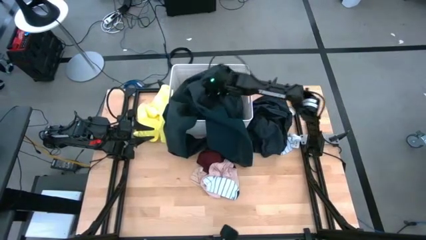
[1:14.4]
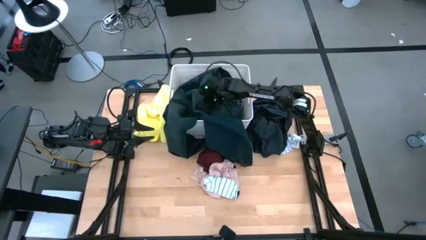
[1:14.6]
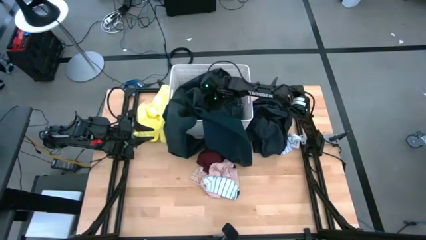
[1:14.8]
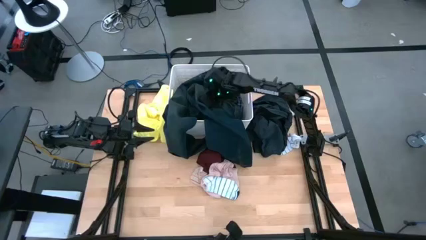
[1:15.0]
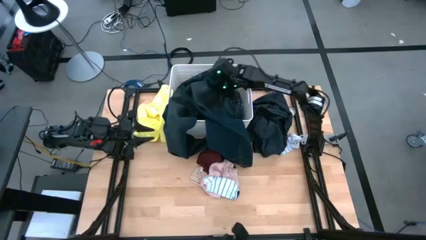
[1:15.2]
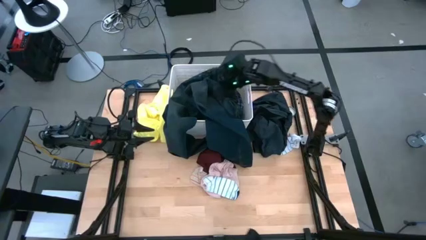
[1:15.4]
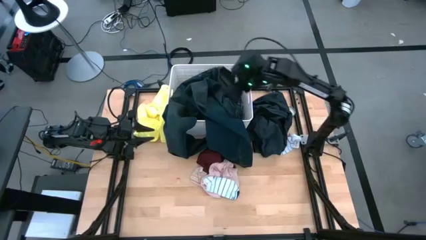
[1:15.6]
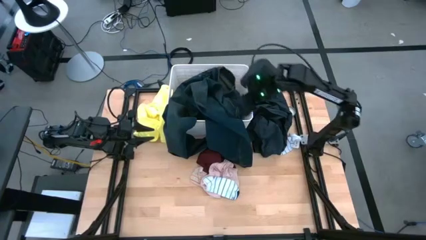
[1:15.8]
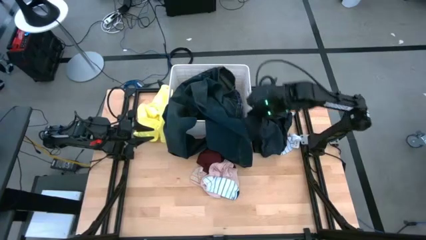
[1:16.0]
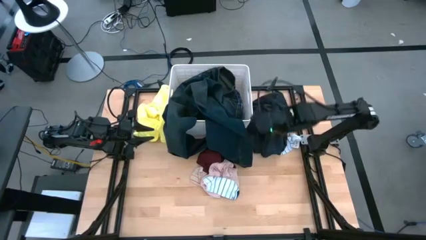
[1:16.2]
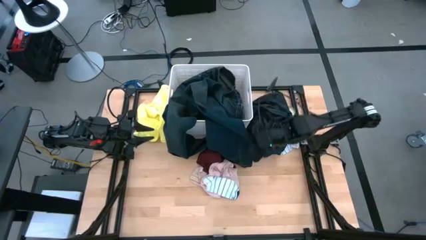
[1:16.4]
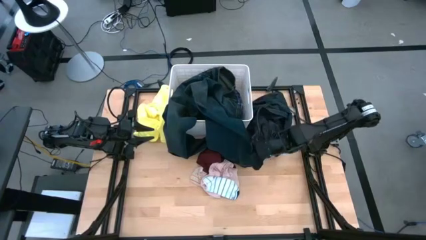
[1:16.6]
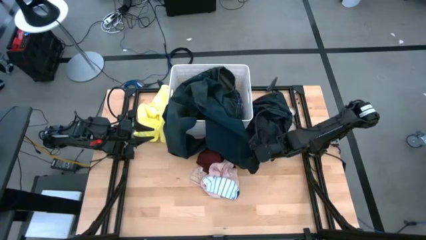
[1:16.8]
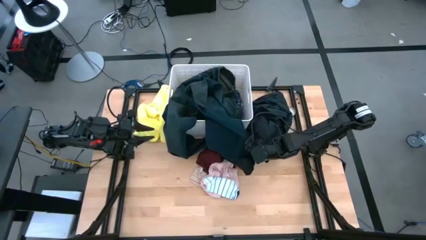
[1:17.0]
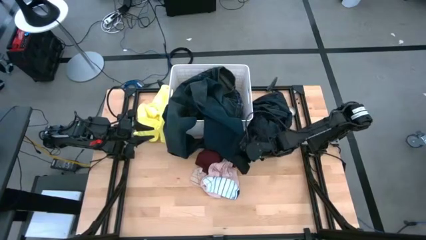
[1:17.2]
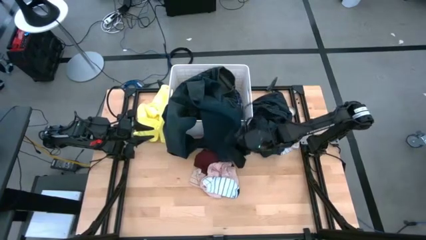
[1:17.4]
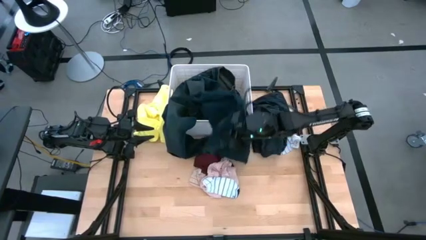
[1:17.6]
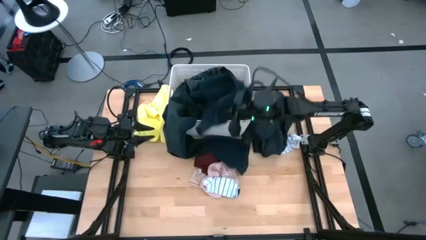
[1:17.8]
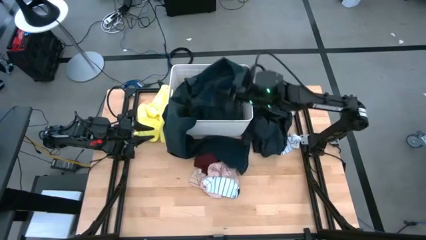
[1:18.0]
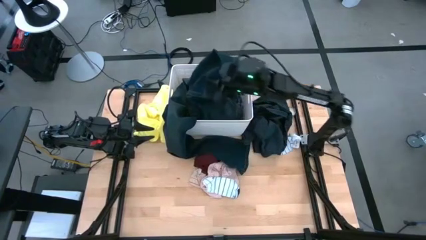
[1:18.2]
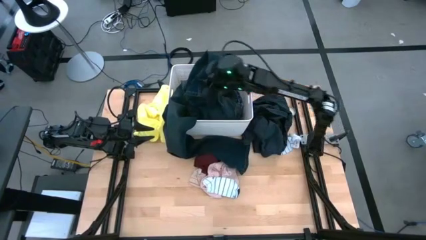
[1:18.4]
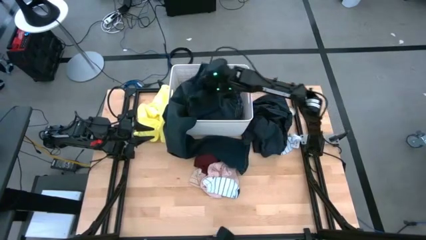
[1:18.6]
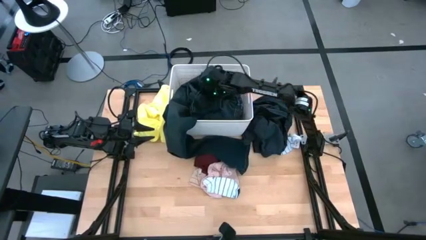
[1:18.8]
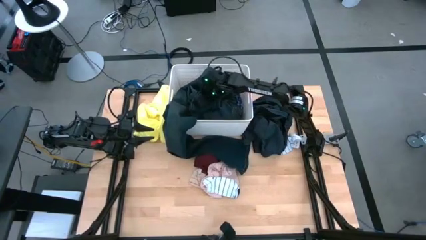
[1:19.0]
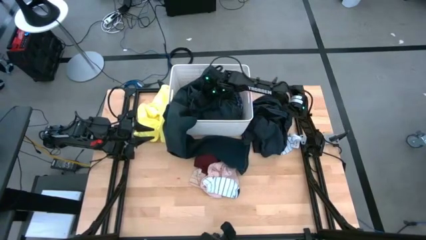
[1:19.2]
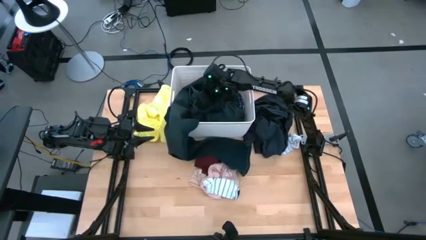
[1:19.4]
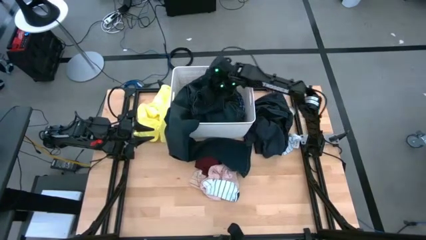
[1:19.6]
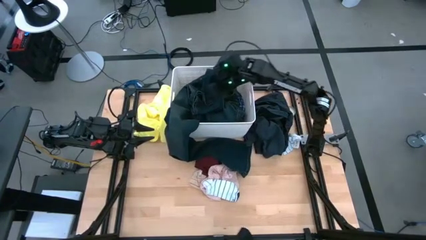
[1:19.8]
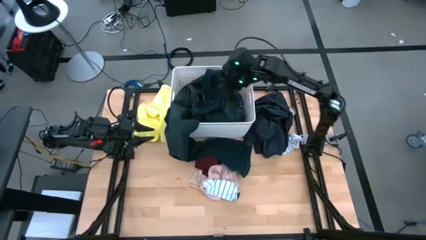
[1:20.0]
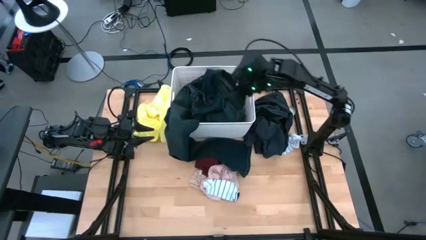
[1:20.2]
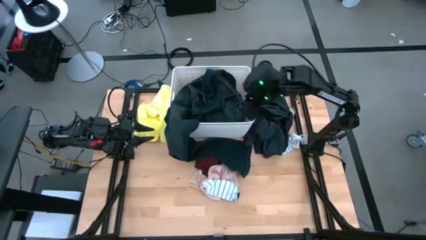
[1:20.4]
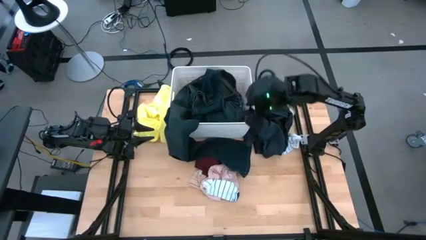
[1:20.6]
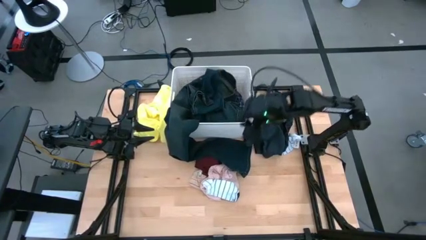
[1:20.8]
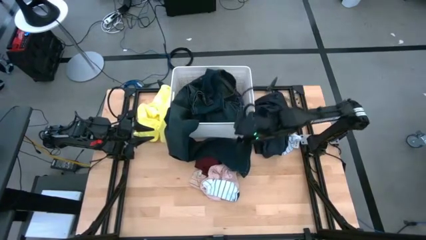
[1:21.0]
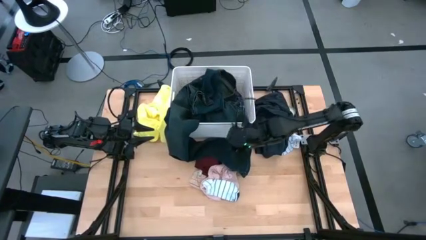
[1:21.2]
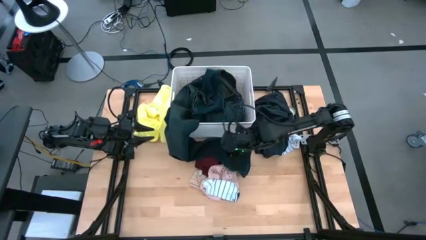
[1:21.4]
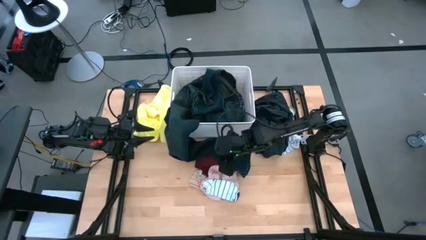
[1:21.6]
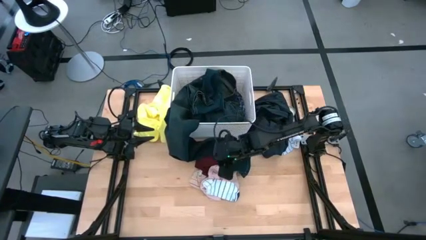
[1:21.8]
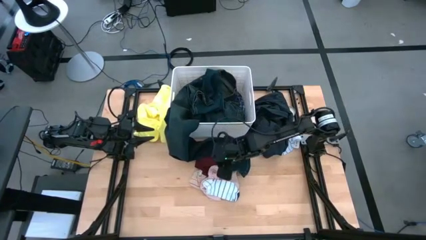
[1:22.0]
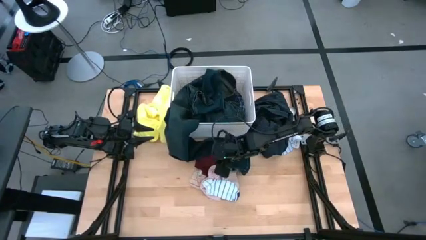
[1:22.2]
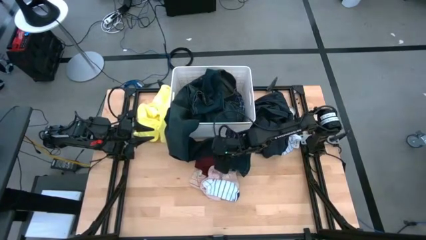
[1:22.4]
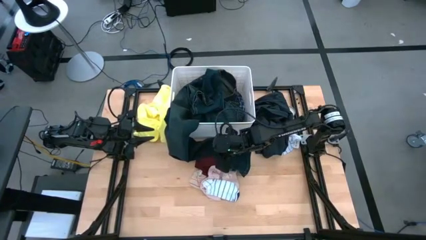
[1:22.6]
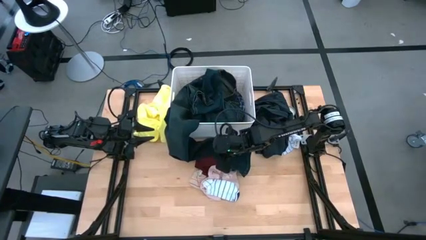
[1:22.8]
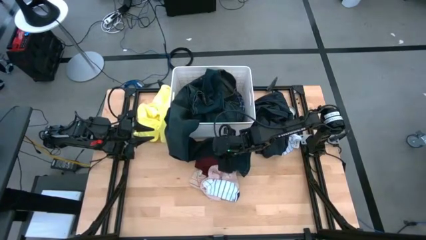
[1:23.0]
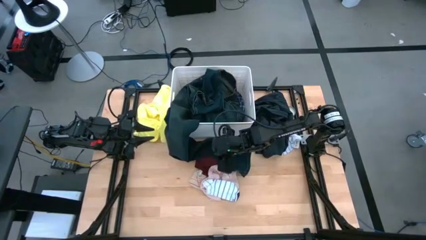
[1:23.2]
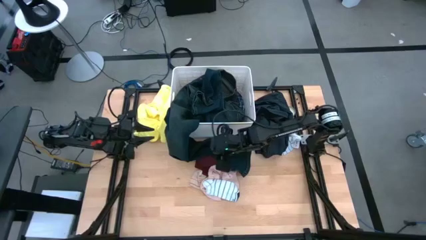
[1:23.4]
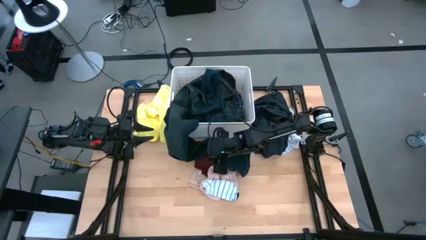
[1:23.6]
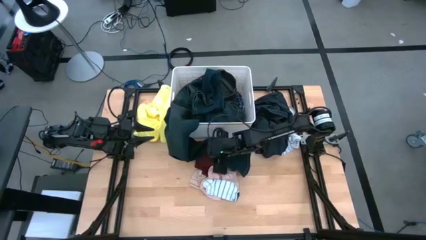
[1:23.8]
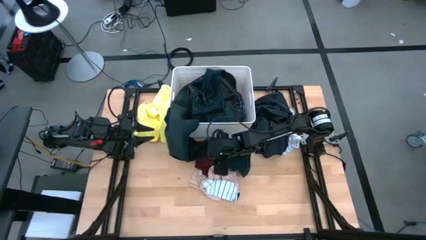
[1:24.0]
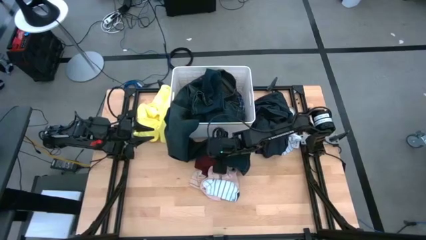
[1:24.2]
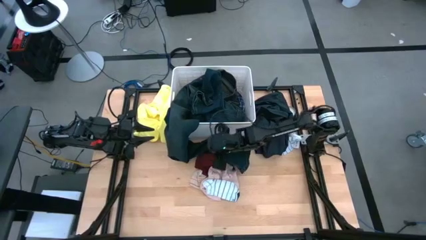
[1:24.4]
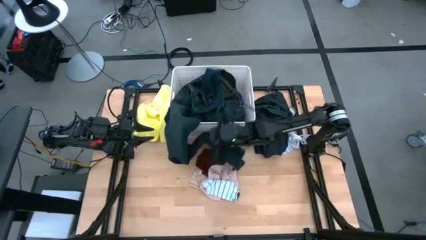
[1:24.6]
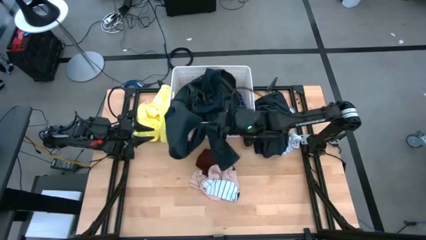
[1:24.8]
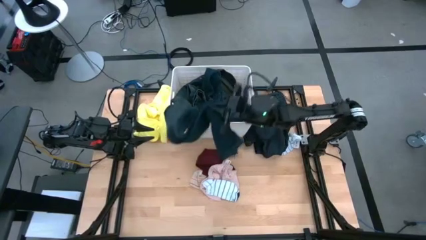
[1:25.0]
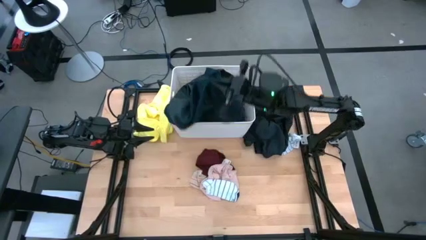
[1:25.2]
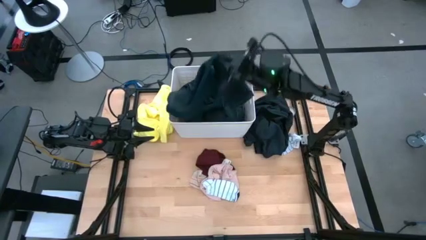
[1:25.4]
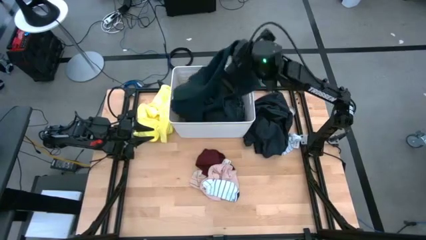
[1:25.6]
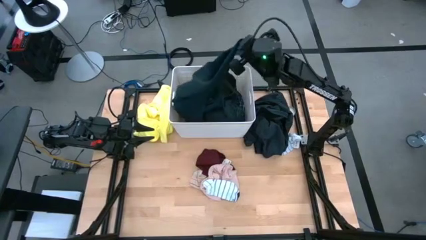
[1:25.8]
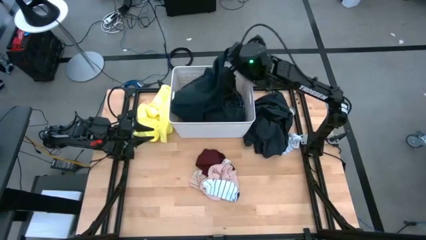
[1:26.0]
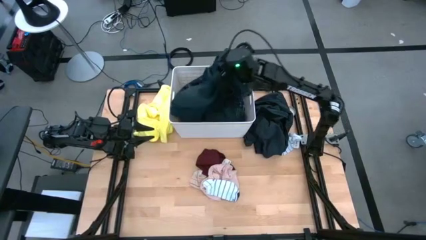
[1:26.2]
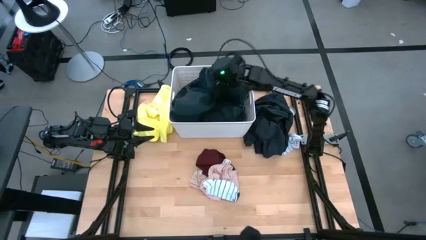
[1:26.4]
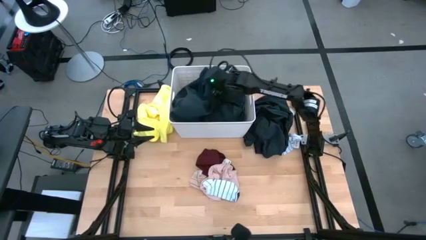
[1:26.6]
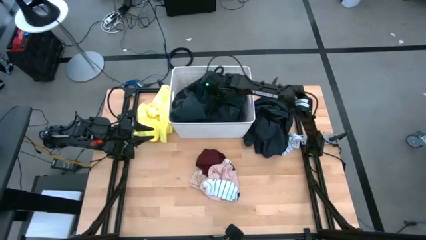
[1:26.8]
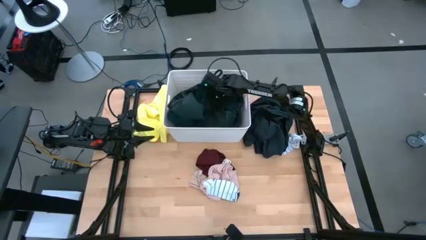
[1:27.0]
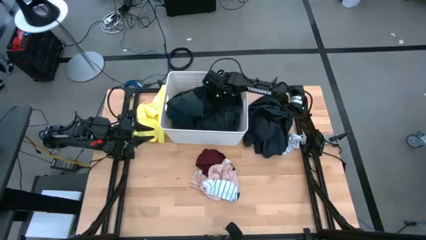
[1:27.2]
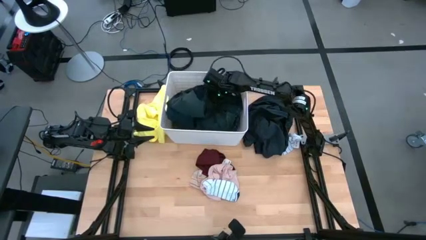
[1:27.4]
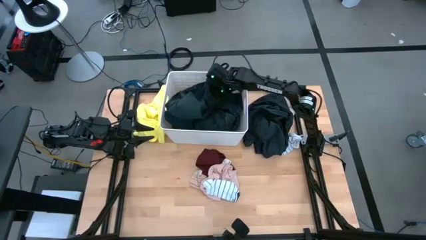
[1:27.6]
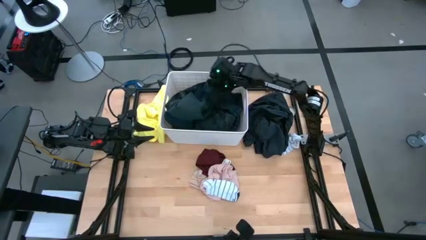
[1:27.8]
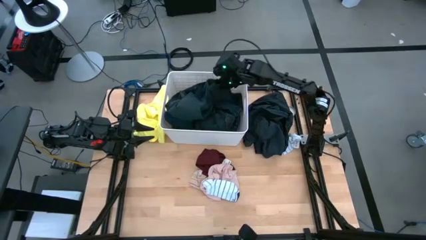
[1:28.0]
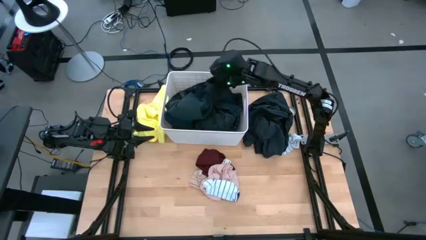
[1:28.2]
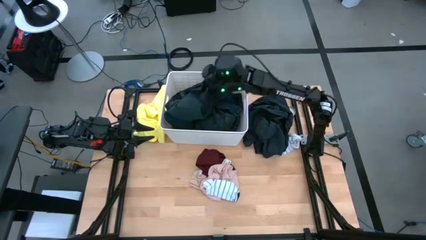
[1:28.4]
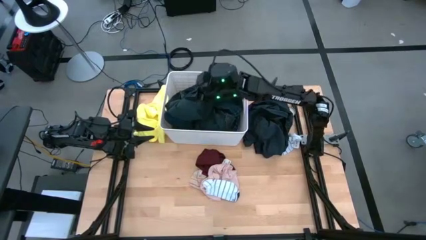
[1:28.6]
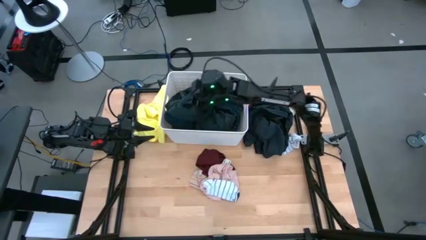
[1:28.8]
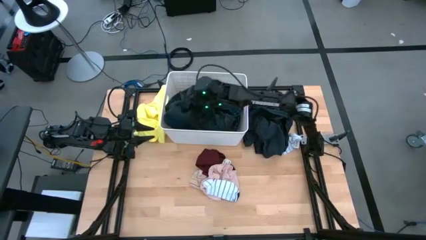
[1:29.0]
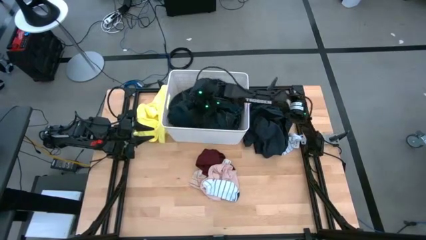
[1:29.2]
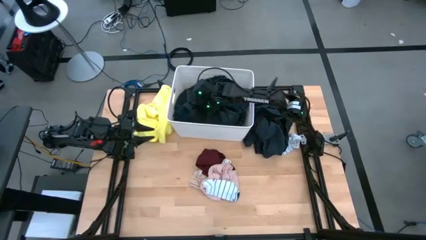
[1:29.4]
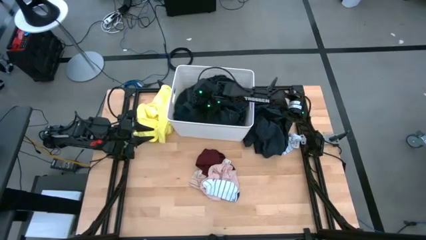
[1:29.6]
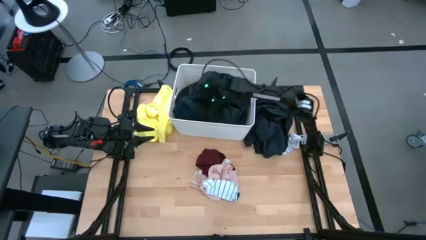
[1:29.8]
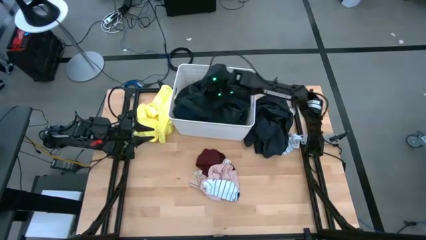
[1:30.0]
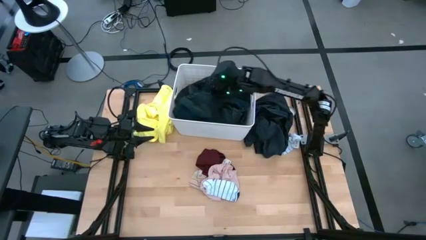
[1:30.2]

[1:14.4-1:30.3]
Task: Sort clothes
Put the blue jeans into the laundry organizer
